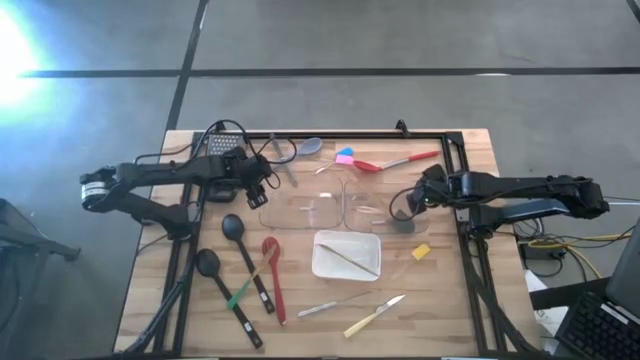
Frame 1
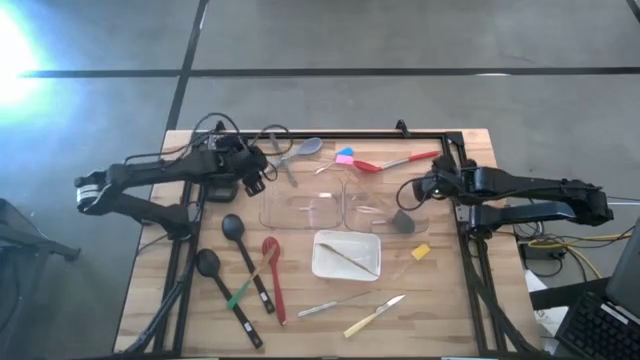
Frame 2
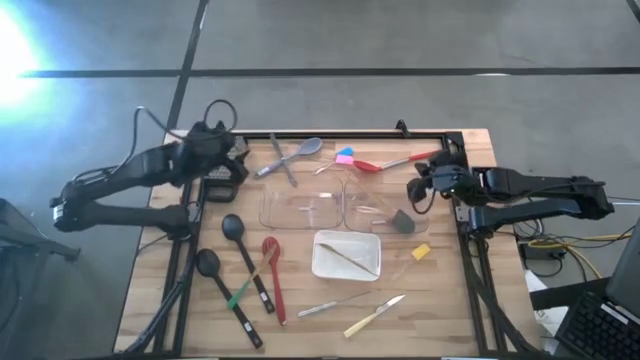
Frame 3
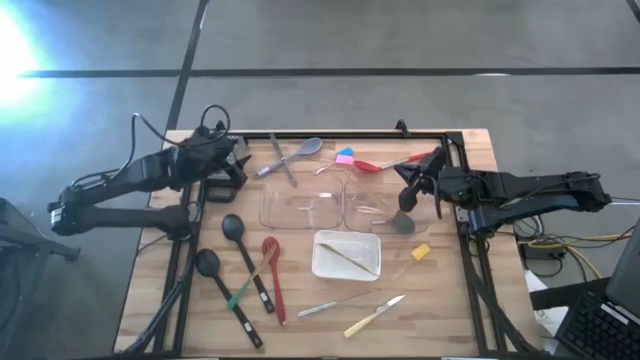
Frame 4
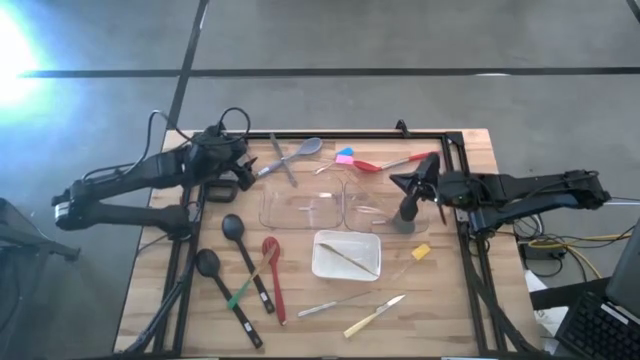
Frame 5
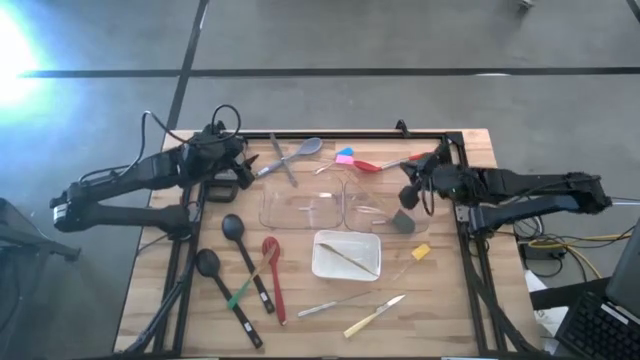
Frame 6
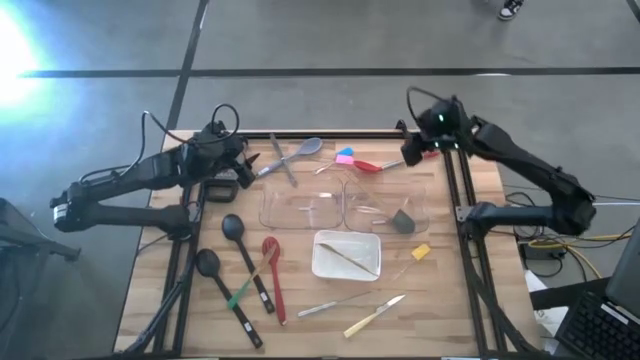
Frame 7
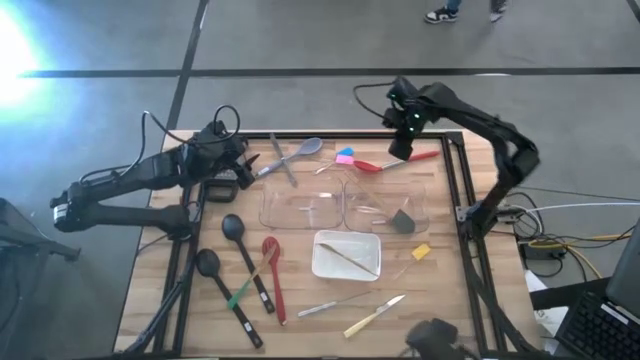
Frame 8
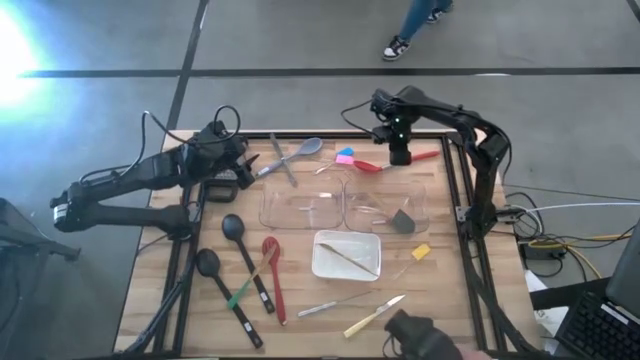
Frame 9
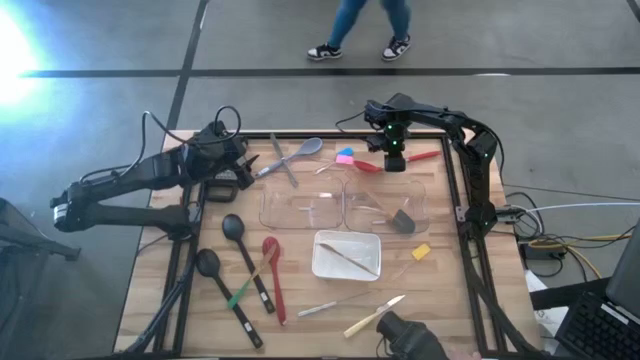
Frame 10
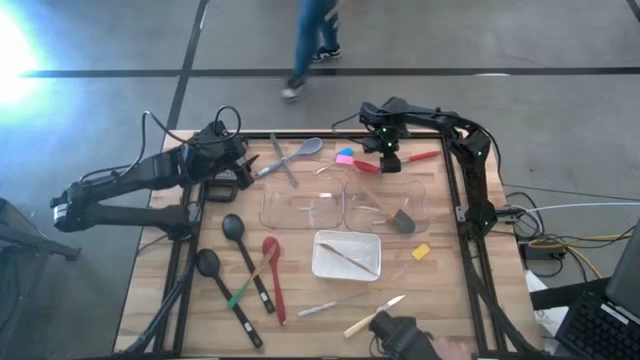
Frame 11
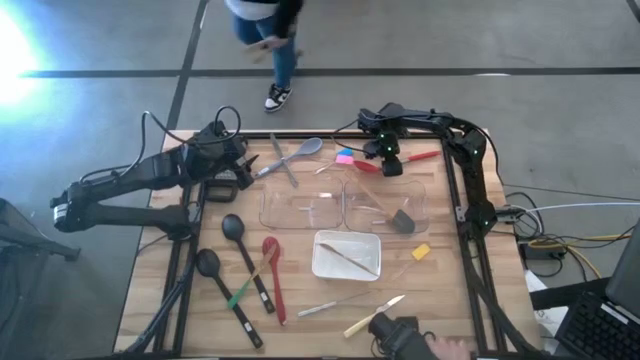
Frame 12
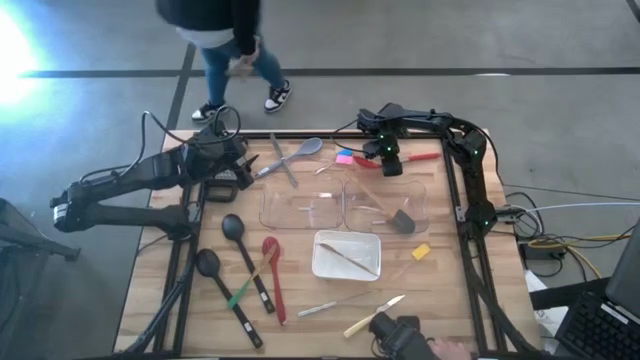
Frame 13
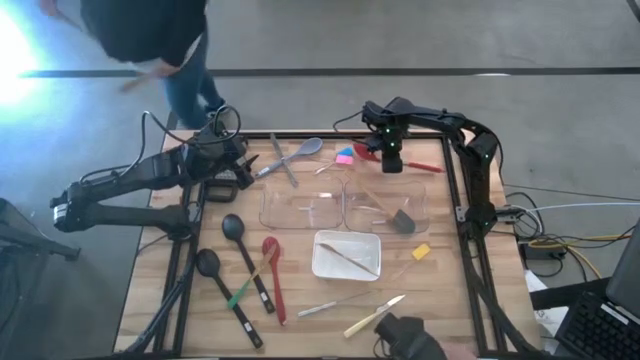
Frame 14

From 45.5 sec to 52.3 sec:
Task: Pick & Place Kitchen Items
Put the red serving spoon into the left transparent bin

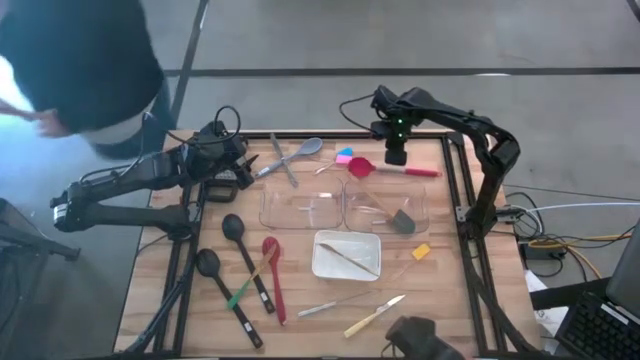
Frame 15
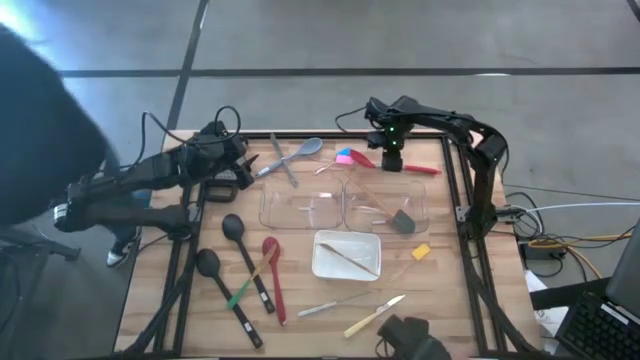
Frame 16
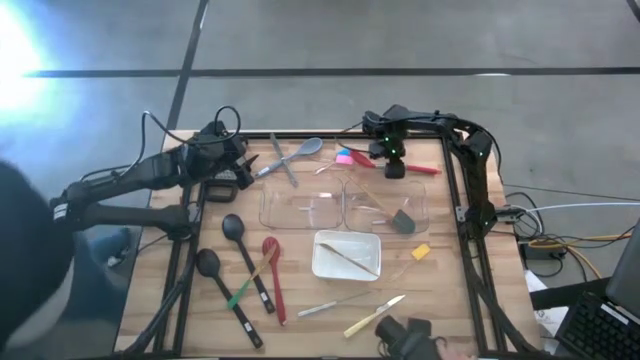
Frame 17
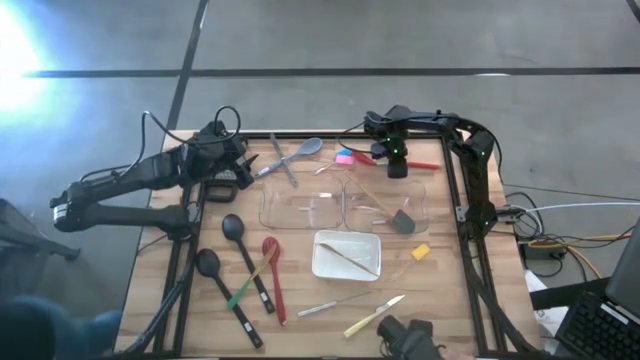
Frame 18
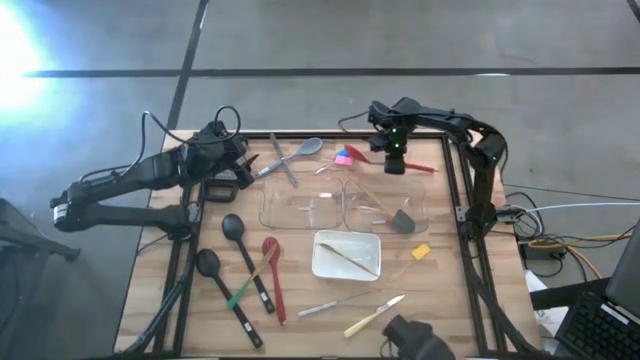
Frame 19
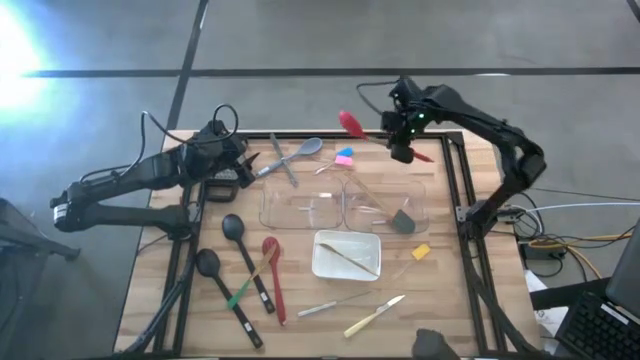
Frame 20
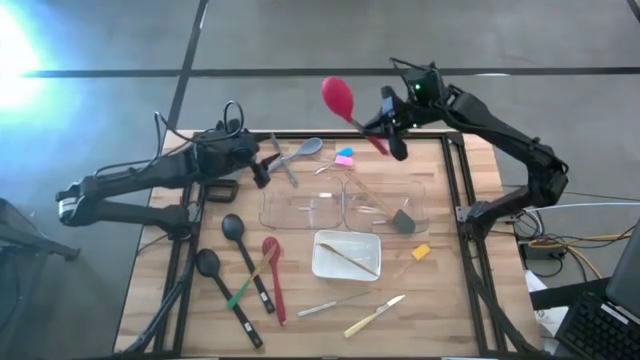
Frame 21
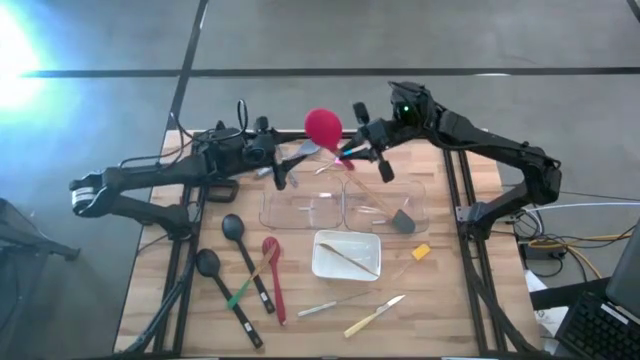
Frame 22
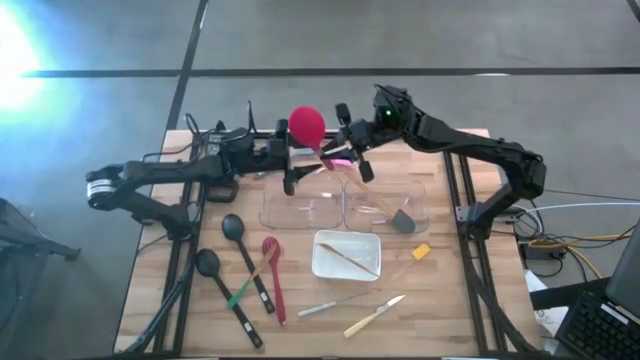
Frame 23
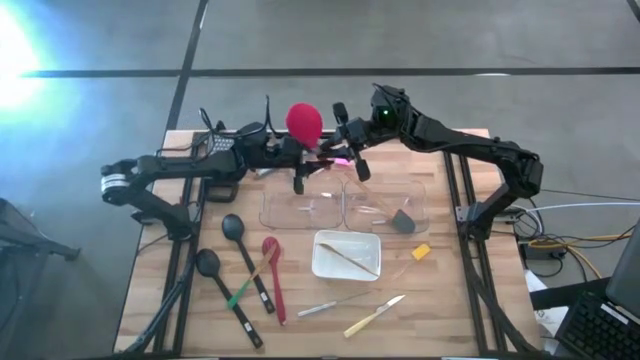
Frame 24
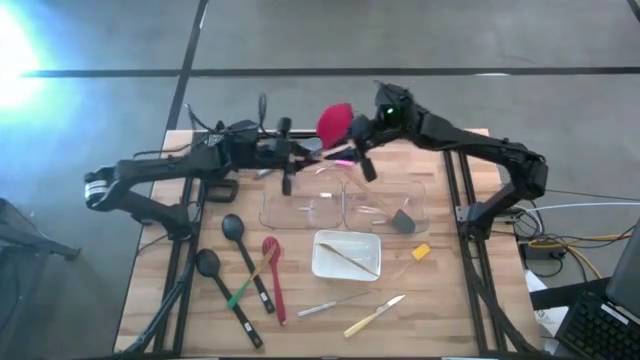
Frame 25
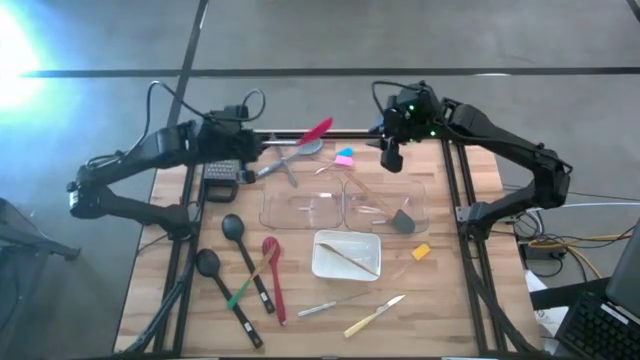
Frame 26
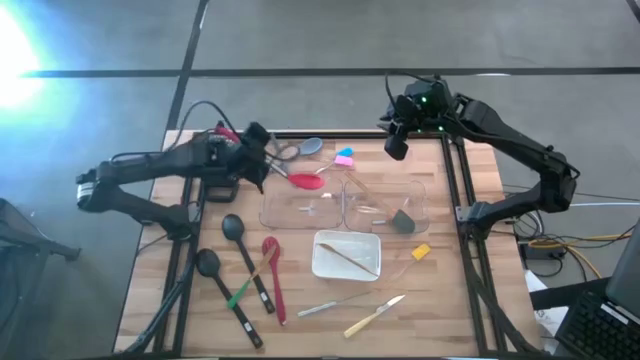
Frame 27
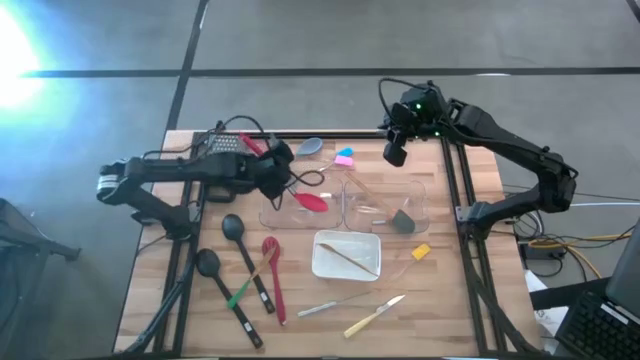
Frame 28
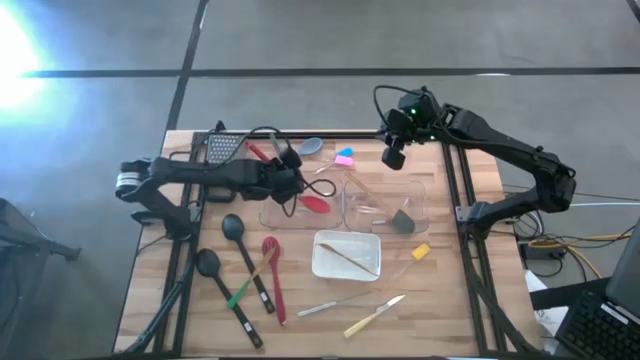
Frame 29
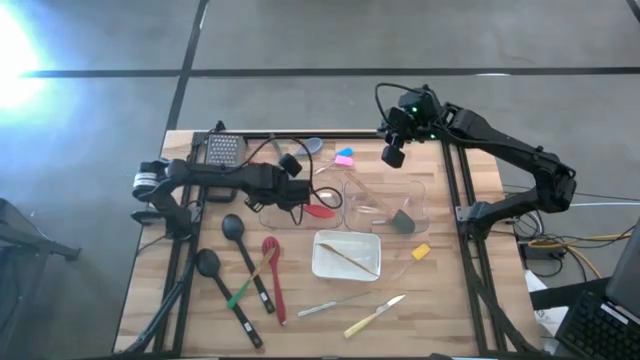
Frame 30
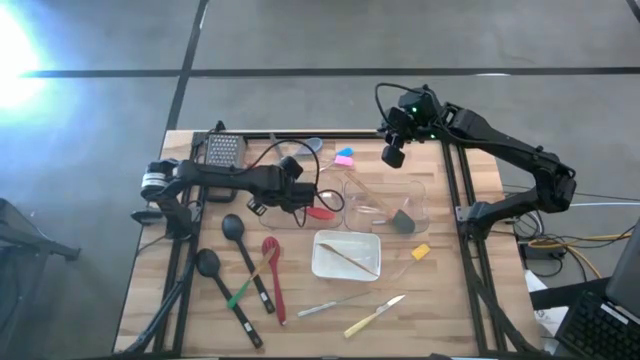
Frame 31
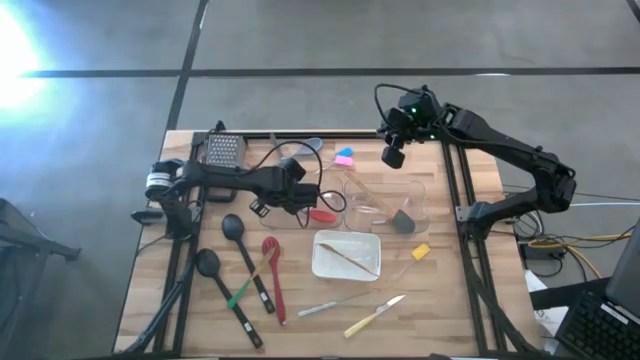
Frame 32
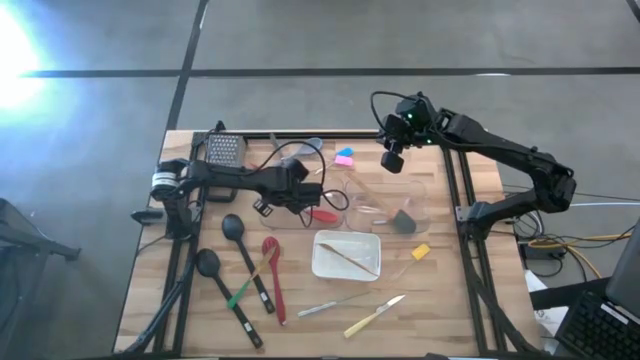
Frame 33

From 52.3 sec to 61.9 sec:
Put the red serving spoon into the left transparent bin

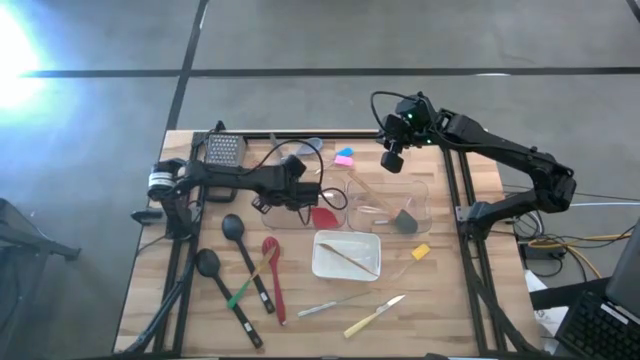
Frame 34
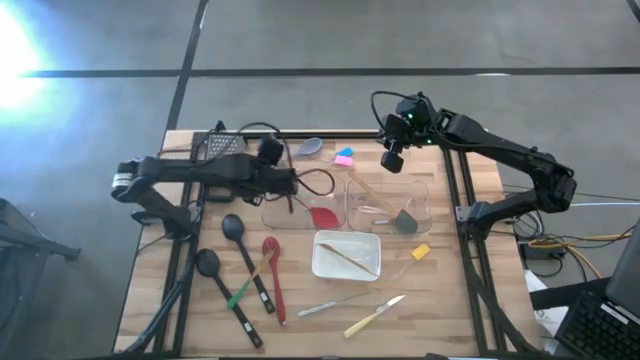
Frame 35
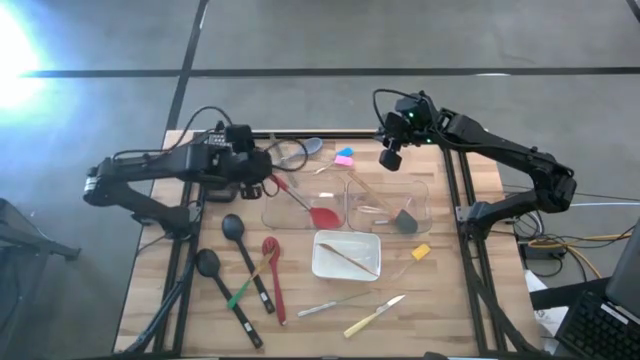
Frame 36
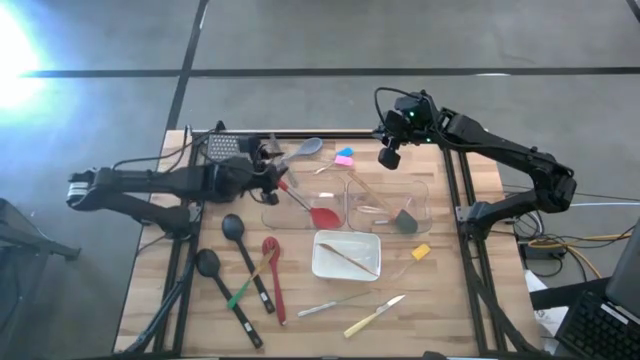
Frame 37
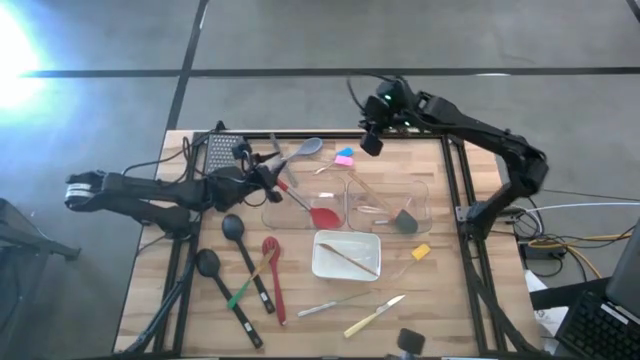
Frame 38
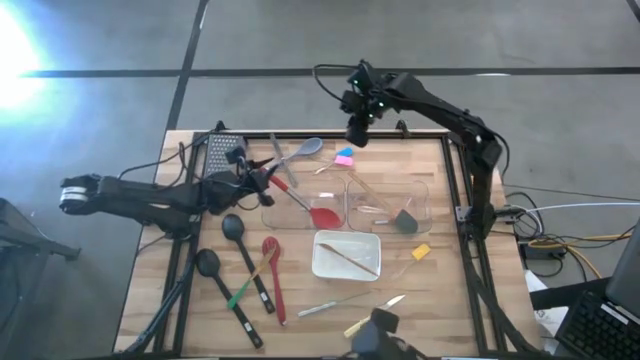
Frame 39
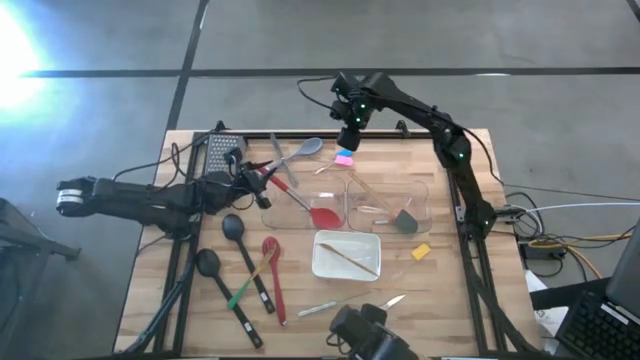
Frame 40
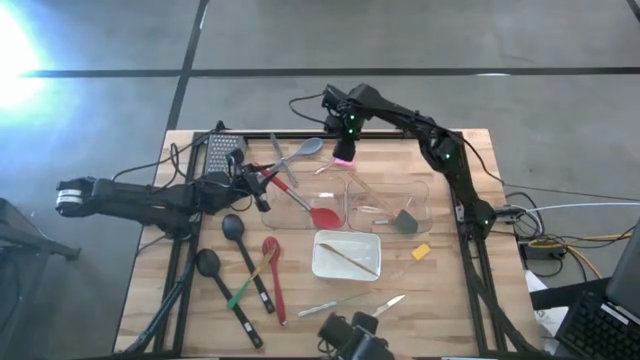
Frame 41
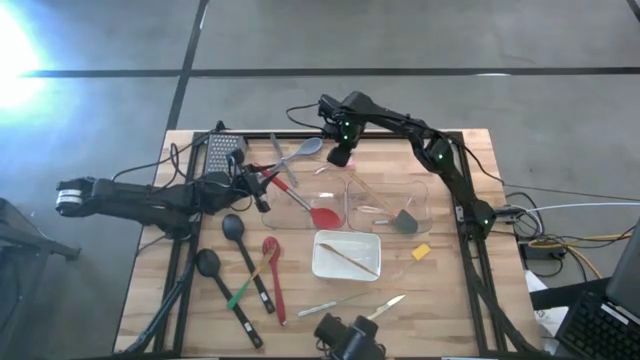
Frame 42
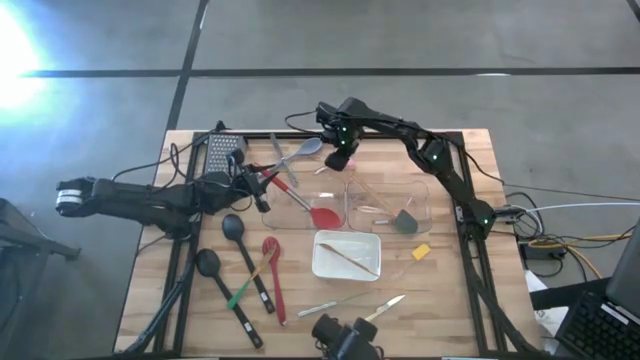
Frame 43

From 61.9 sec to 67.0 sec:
Adjust the pink spatula
